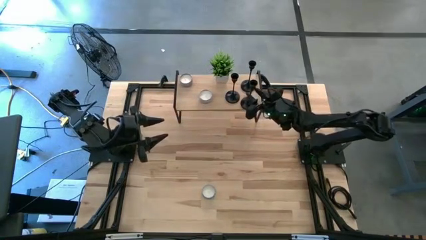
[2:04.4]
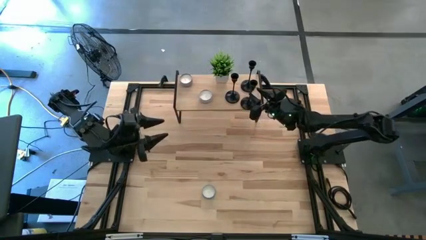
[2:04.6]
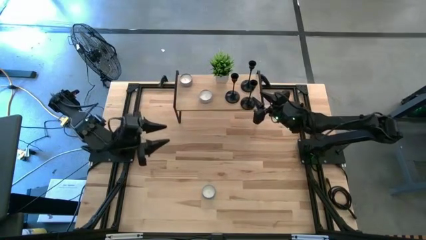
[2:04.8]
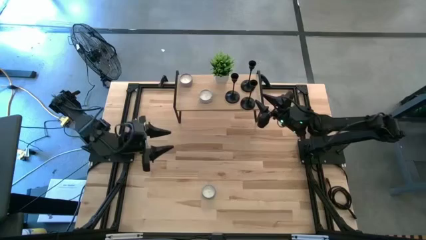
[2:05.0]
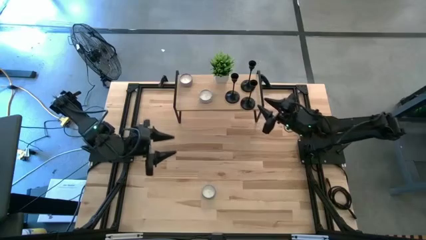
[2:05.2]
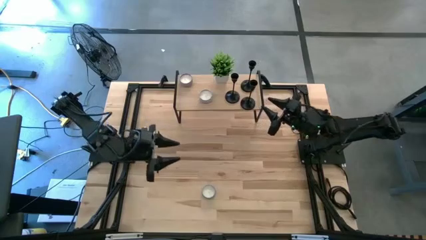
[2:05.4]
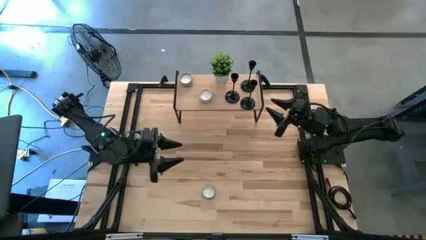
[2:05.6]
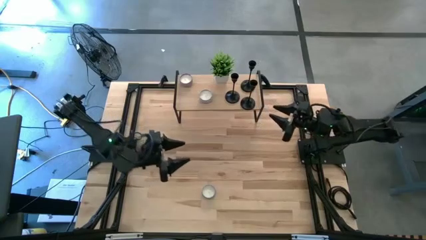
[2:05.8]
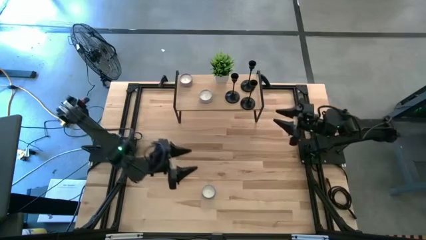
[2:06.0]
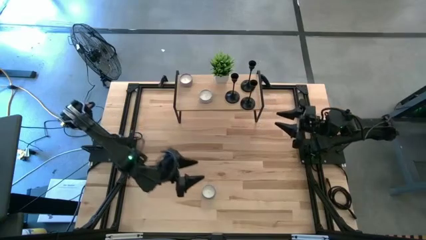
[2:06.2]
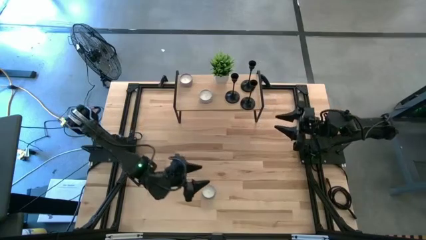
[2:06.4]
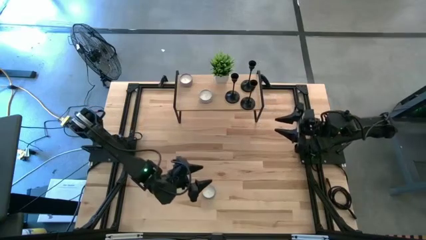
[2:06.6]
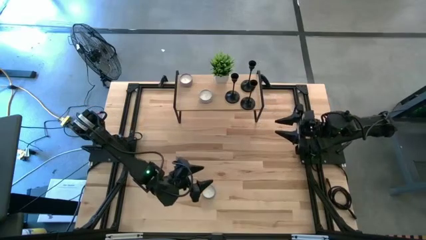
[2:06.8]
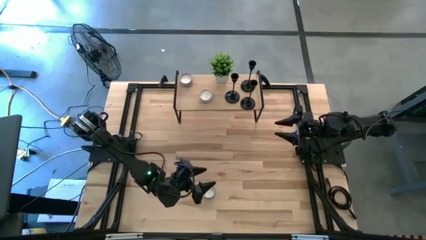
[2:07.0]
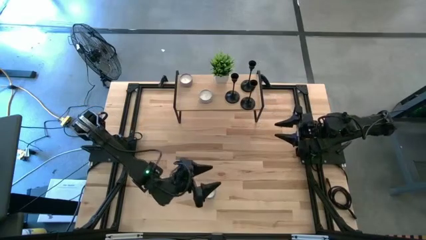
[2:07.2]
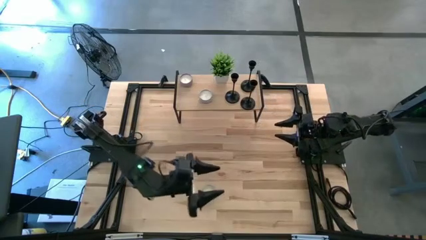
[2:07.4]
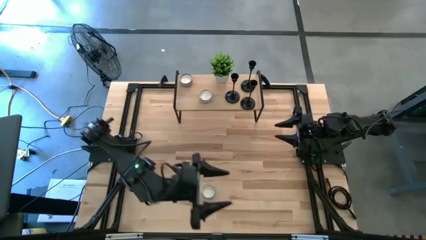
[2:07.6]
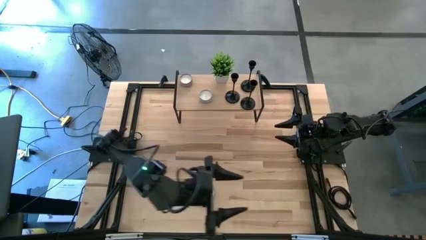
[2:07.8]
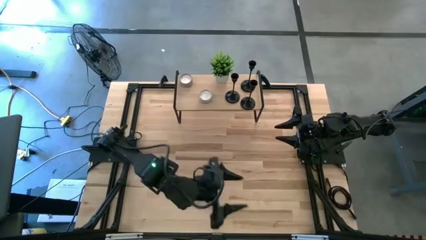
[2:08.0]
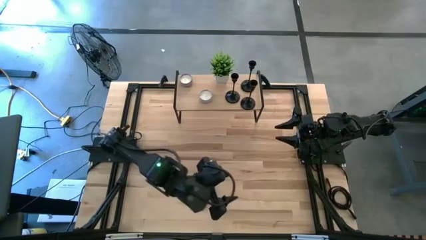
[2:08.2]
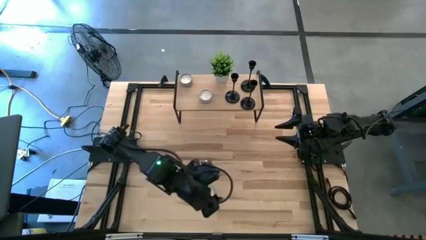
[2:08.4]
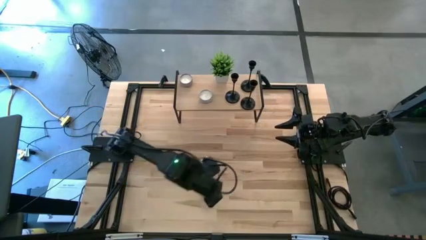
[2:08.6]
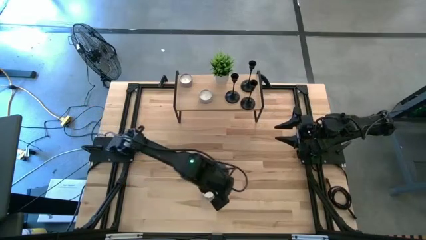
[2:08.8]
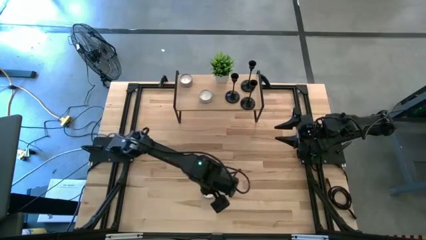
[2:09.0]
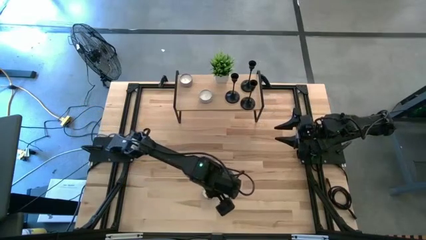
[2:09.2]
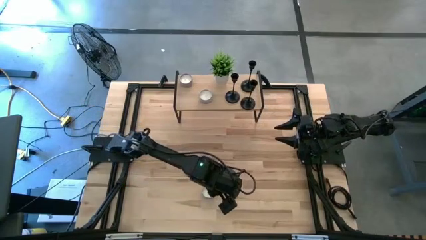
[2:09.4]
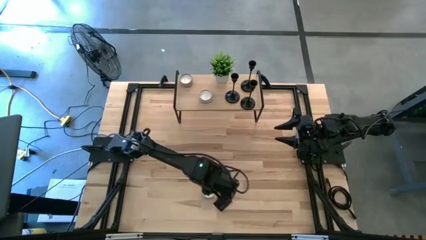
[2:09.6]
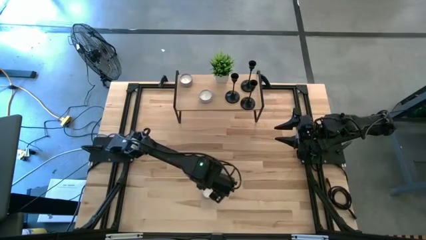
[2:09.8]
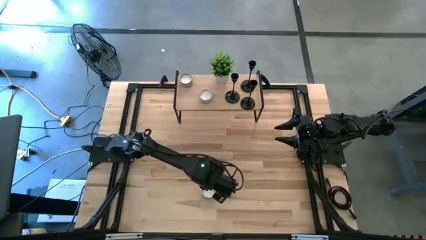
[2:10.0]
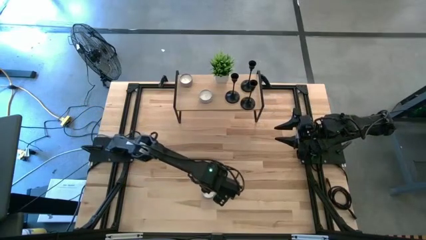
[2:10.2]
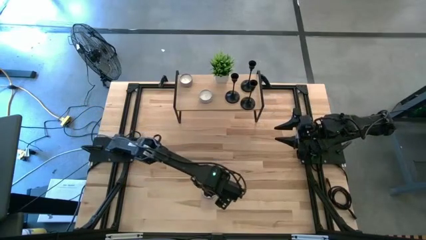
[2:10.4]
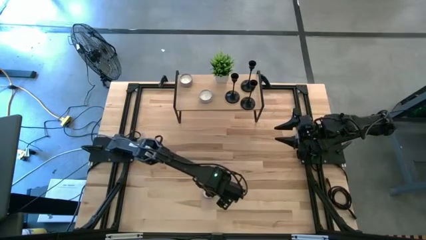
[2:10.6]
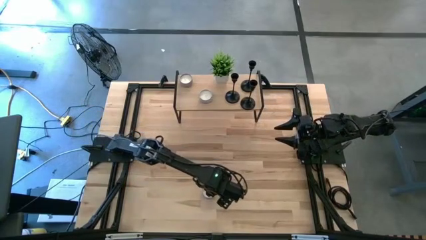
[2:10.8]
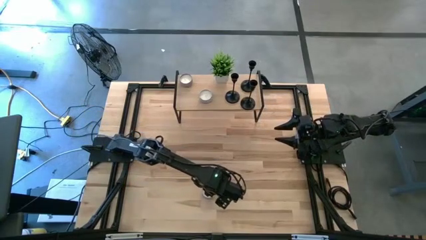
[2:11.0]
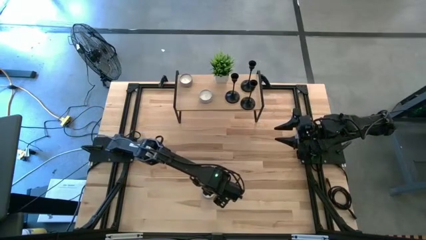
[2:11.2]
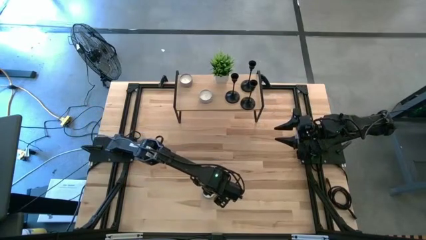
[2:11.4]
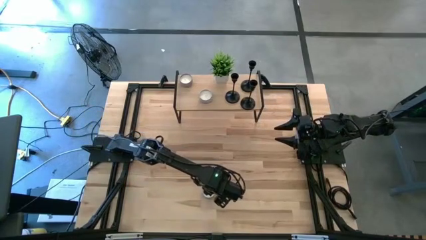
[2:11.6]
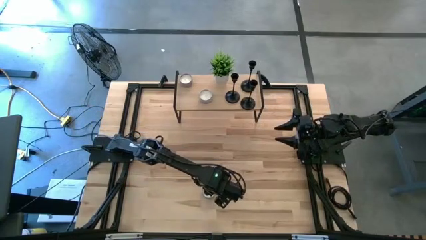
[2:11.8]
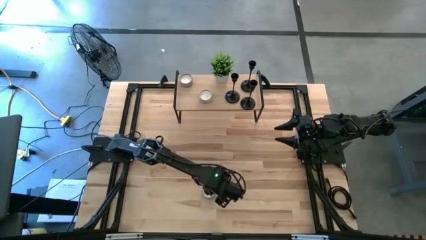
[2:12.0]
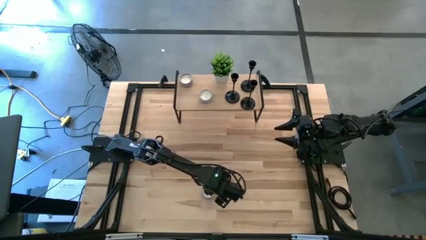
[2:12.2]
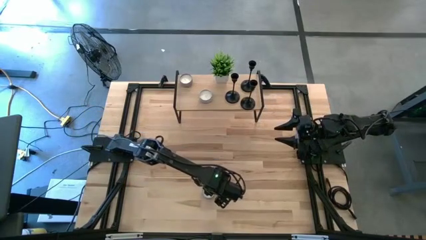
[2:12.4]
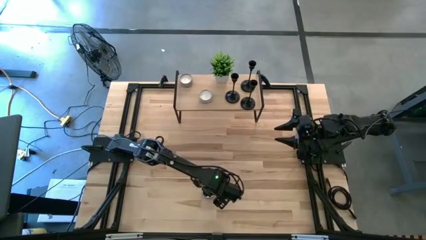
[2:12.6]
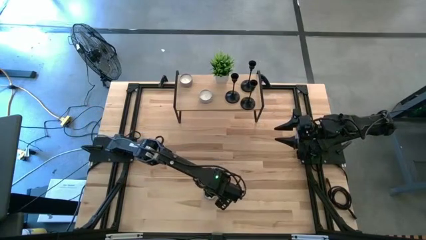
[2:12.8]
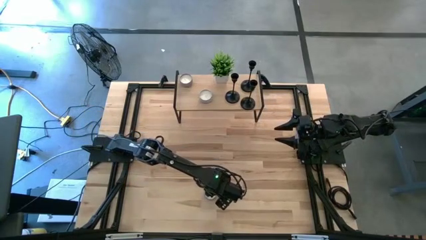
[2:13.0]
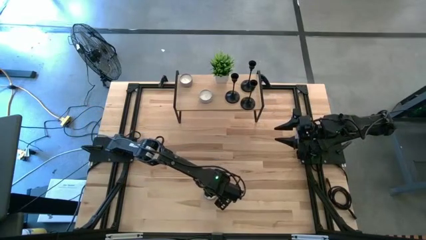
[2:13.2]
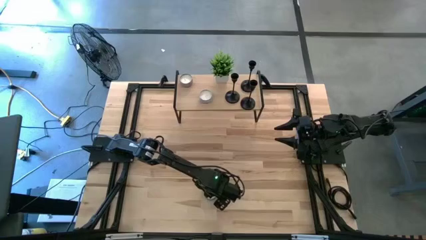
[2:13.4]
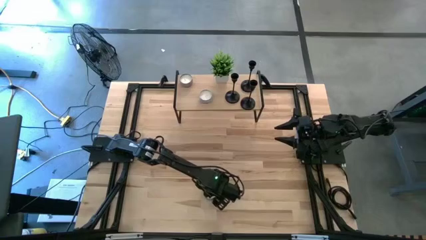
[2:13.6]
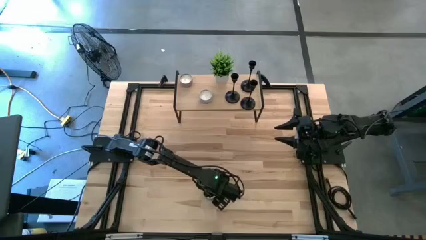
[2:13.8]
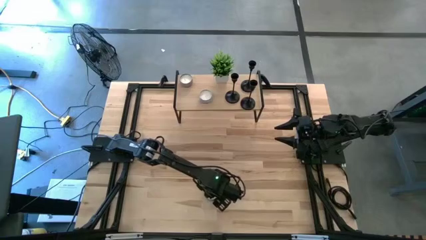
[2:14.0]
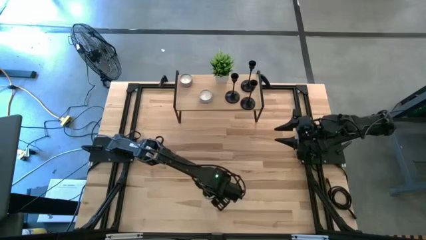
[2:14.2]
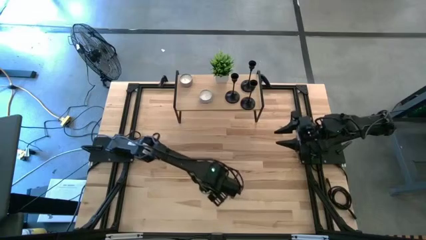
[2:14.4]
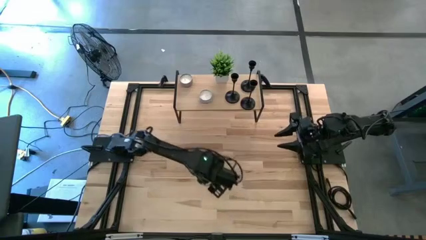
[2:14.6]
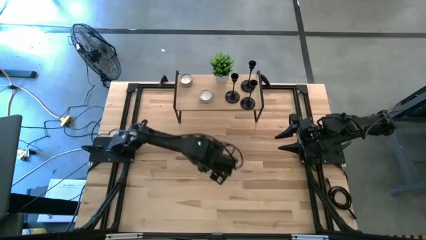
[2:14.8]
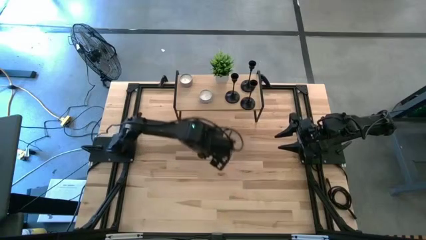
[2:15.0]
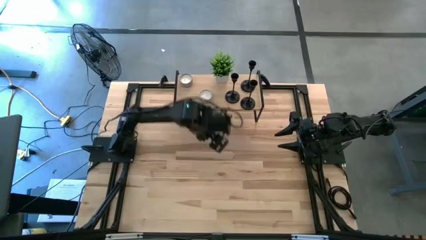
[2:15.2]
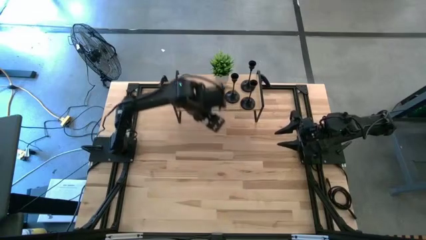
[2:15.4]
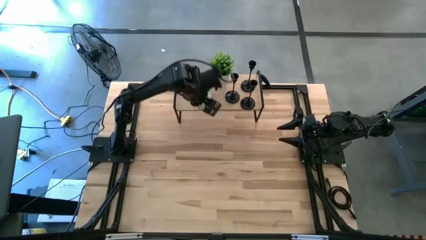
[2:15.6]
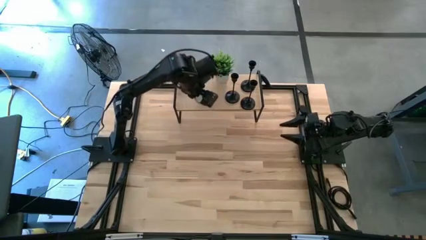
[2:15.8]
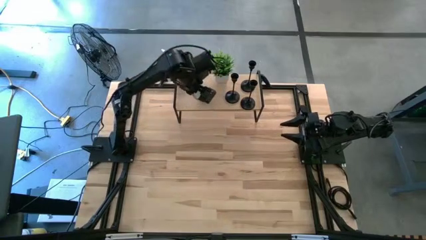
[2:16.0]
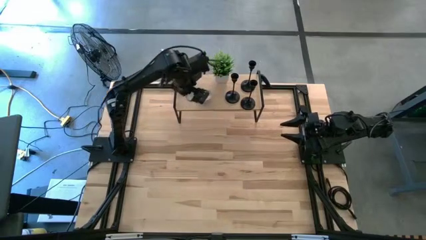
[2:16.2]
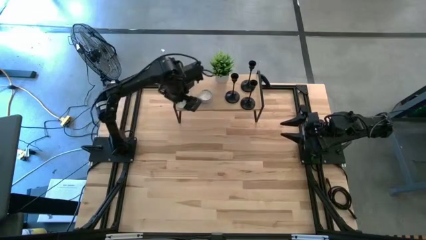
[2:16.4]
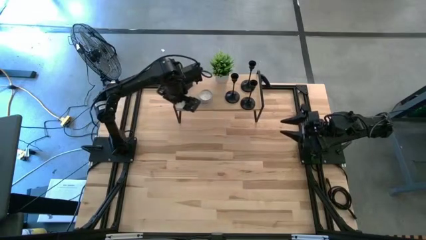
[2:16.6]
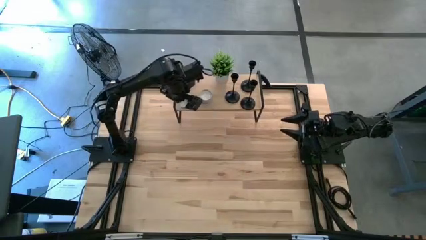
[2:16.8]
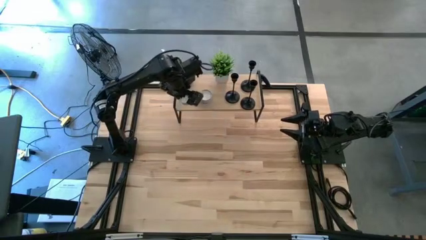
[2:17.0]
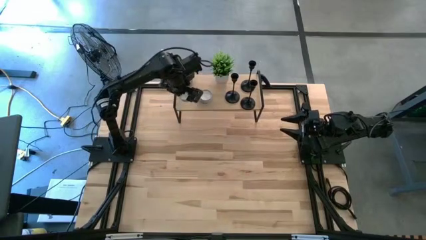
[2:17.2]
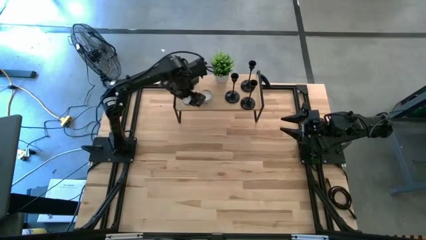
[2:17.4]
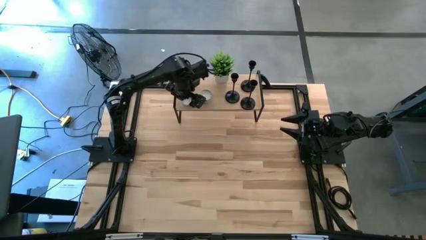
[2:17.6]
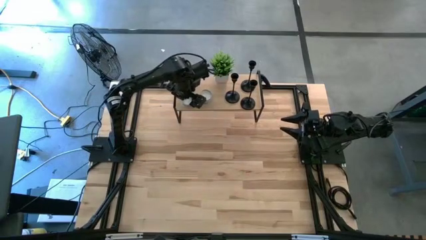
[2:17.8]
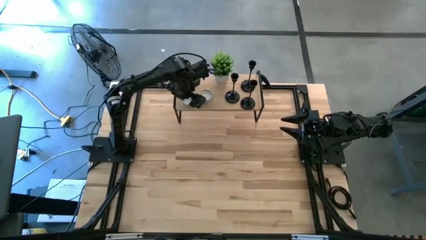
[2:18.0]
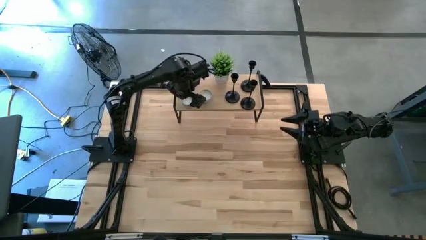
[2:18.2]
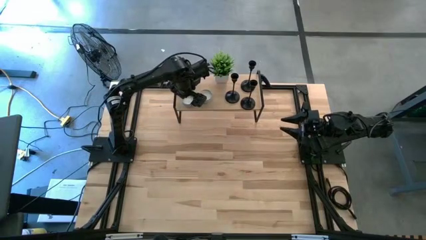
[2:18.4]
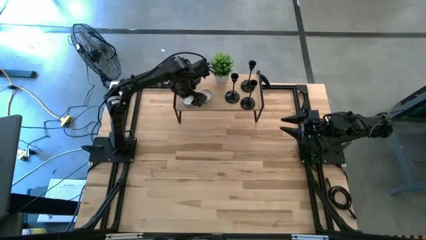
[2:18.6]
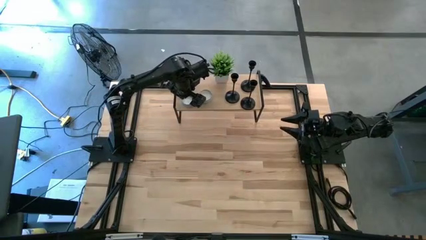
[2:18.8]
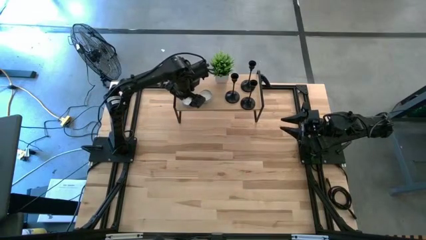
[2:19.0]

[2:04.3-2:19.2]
Task: Pick & Place candle stick holders
Put the light blue scented candle on the shelf

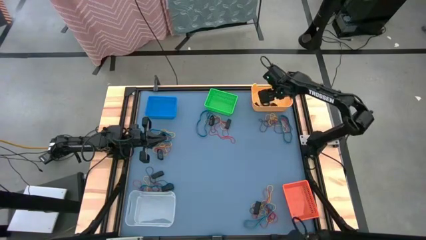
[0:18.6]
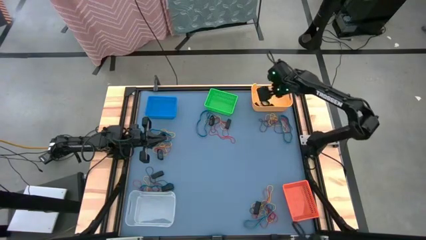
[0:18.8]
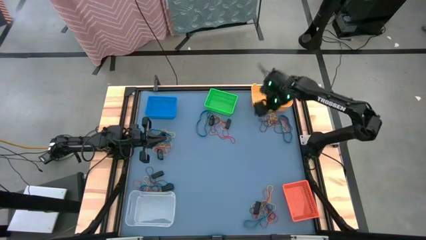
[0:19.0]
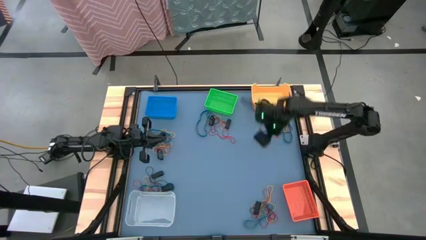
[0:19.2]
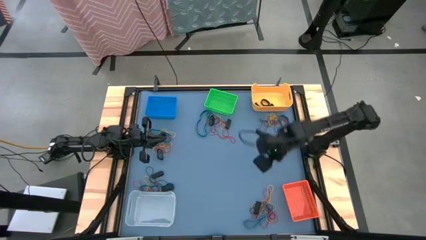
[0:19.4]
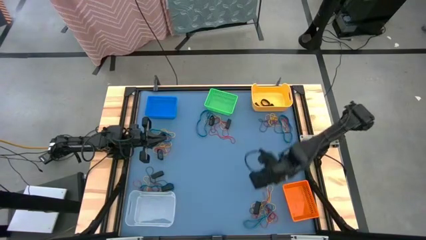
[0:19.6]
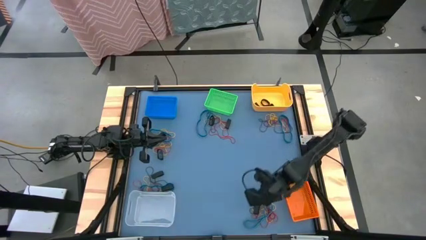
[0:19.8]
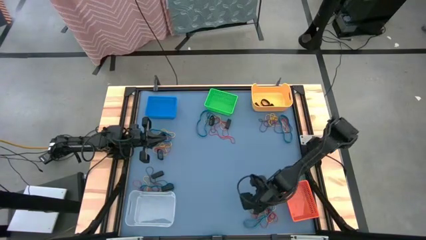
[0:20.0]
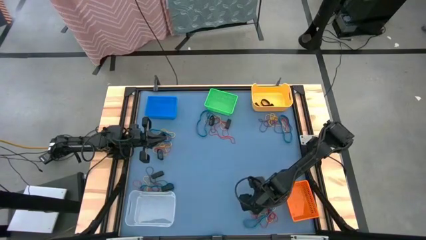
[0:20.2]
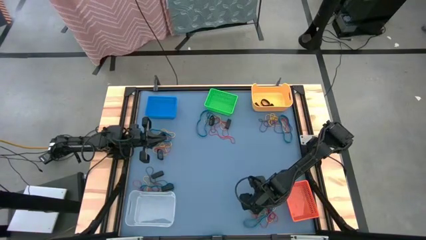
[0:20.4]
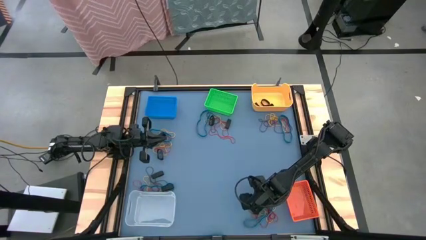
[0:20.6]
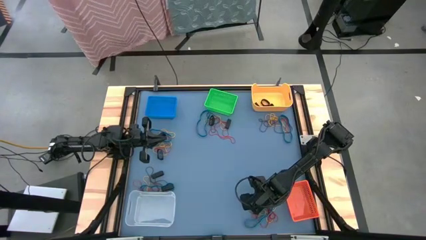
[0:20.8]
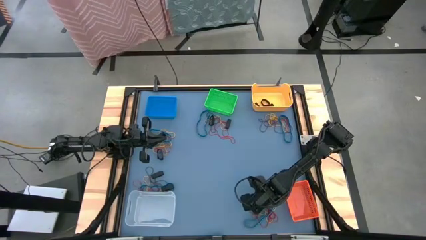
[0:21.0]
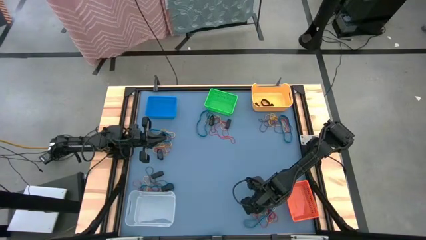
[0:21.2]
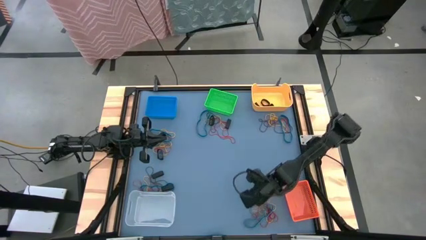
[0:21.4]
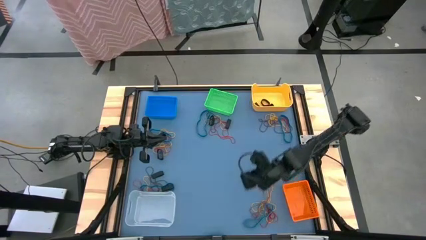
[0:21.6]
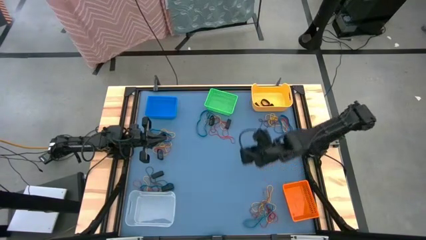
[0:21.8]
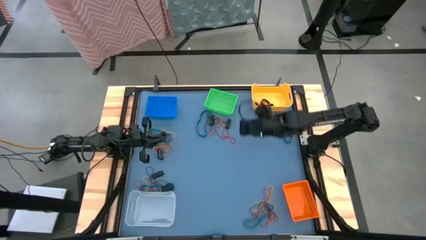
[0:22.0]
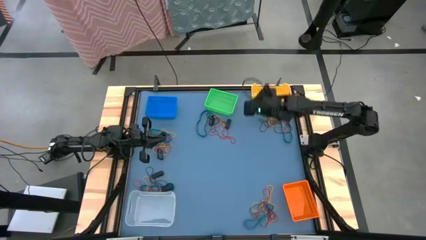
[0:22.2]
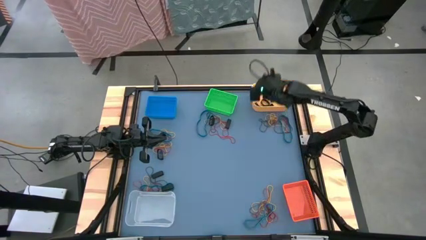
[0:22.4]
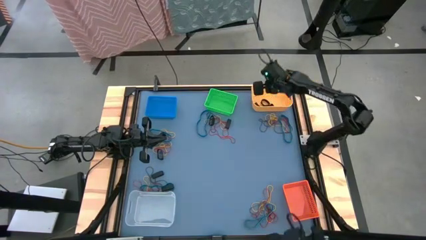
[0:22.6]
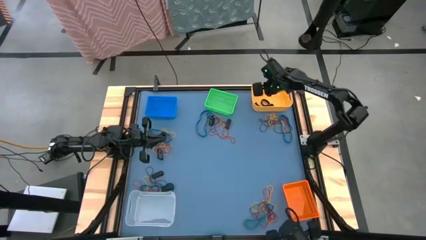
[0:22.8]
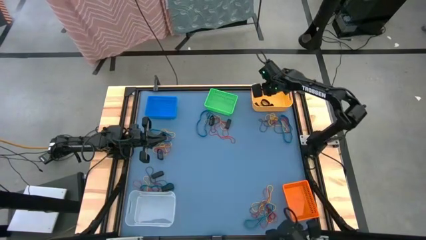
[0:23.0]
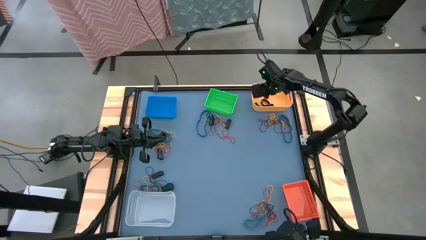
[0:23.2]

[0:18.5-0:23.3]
Task: Sort rubber bands into baskets
Put the black rubber band into the yellow bin
